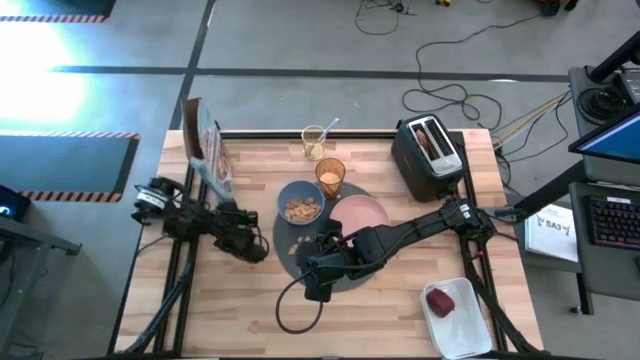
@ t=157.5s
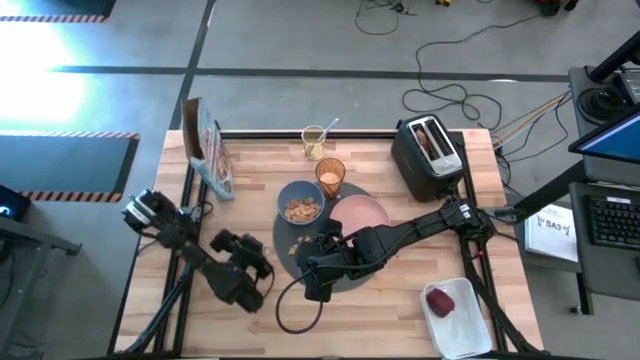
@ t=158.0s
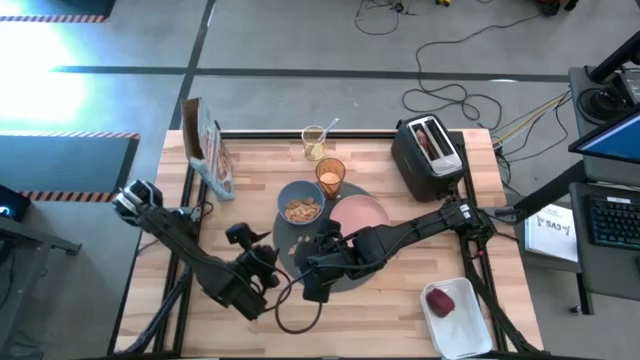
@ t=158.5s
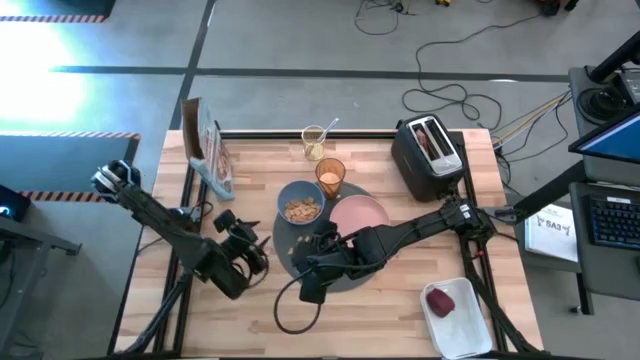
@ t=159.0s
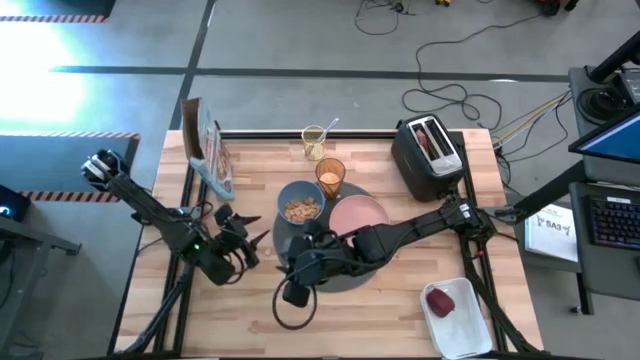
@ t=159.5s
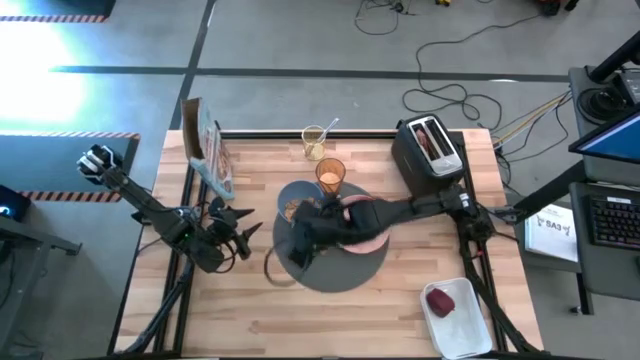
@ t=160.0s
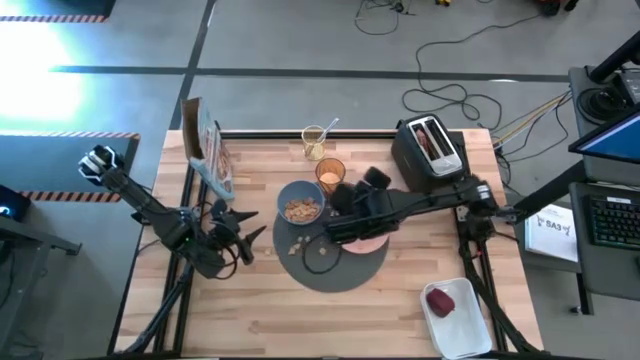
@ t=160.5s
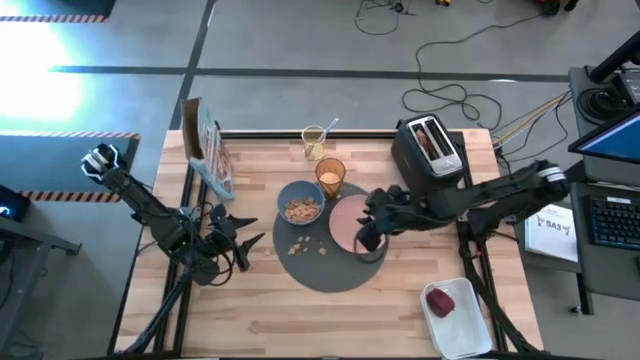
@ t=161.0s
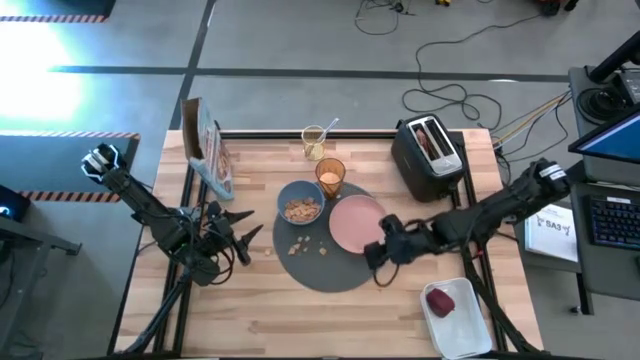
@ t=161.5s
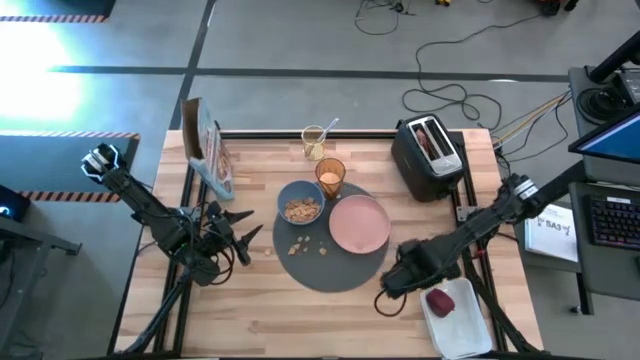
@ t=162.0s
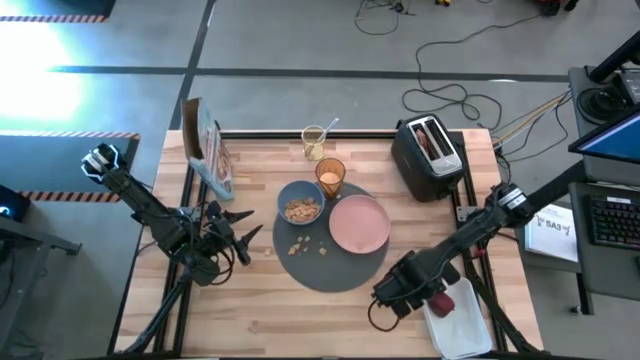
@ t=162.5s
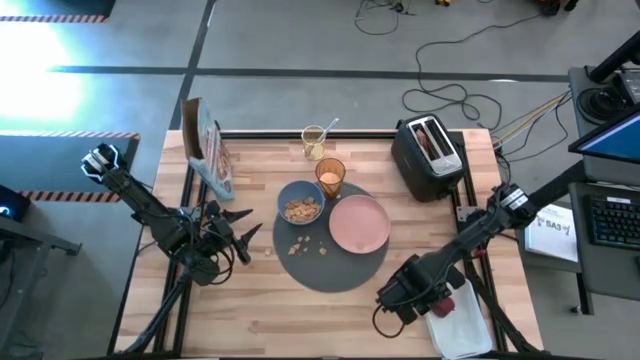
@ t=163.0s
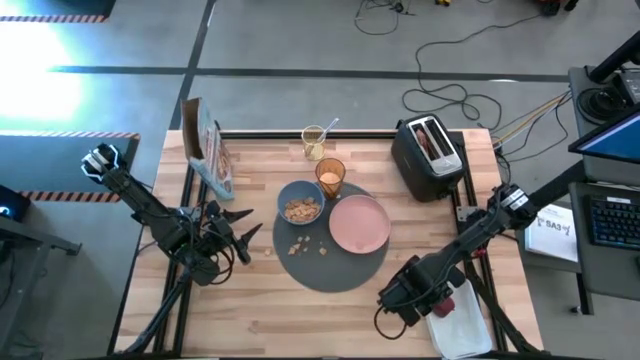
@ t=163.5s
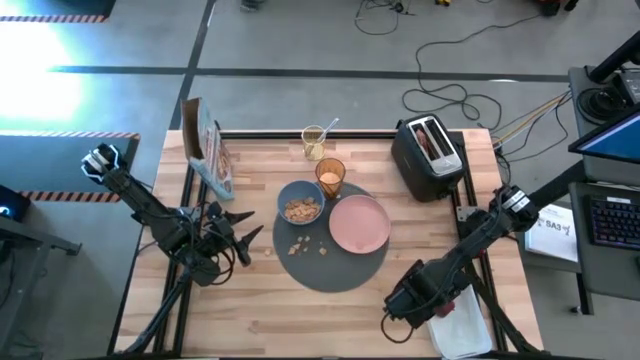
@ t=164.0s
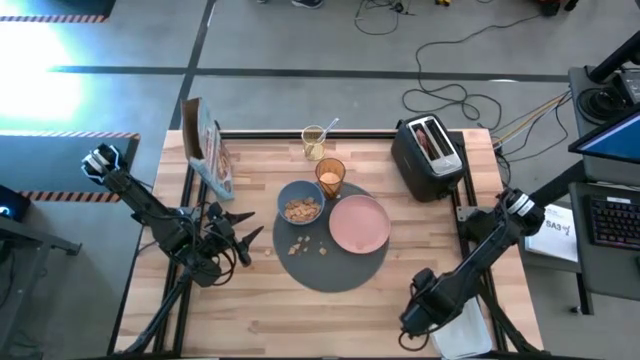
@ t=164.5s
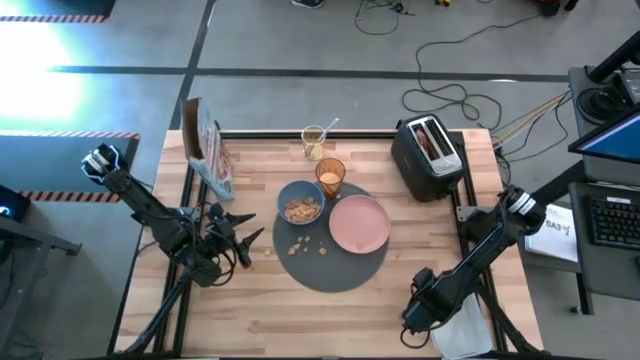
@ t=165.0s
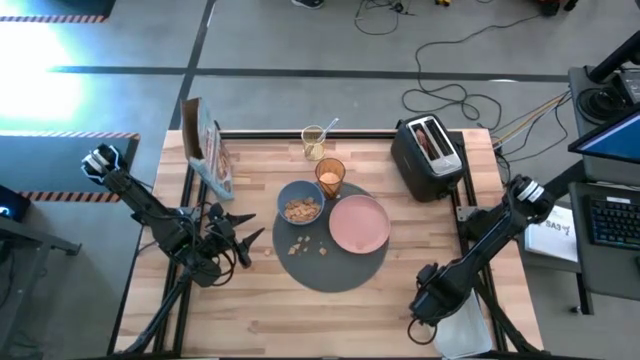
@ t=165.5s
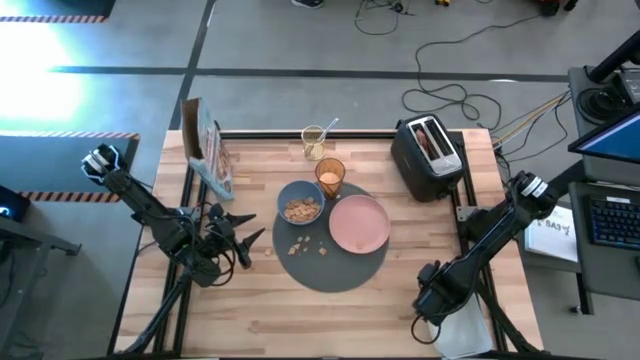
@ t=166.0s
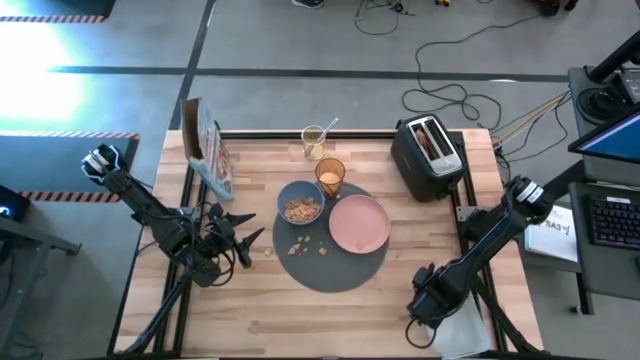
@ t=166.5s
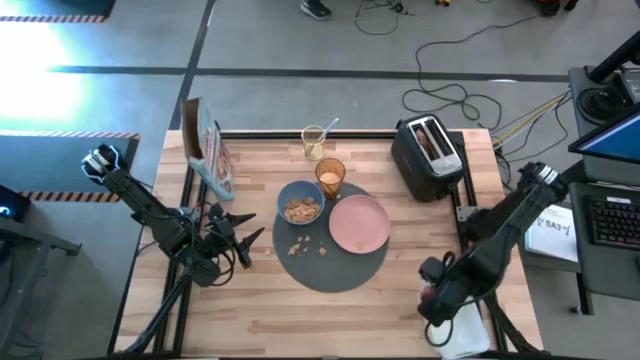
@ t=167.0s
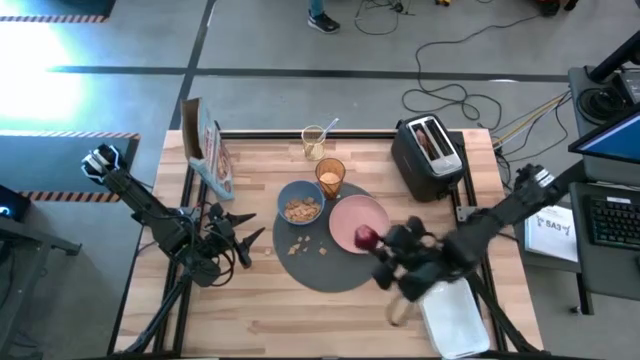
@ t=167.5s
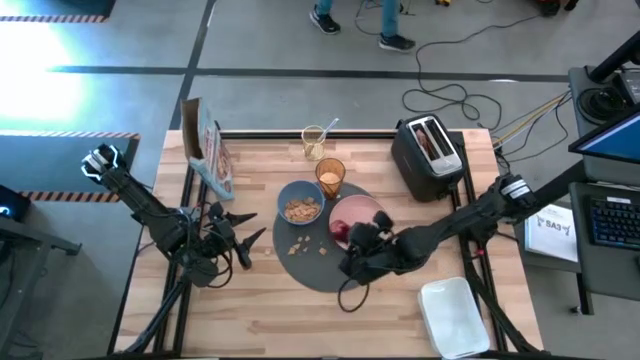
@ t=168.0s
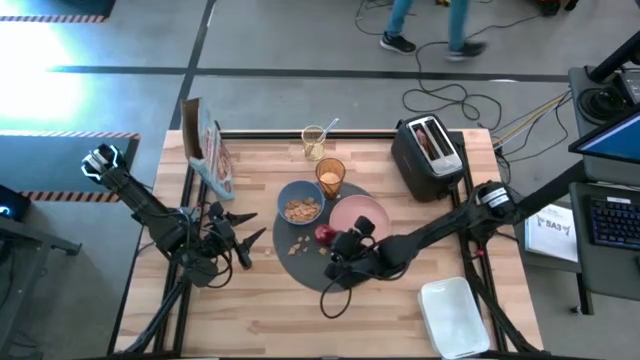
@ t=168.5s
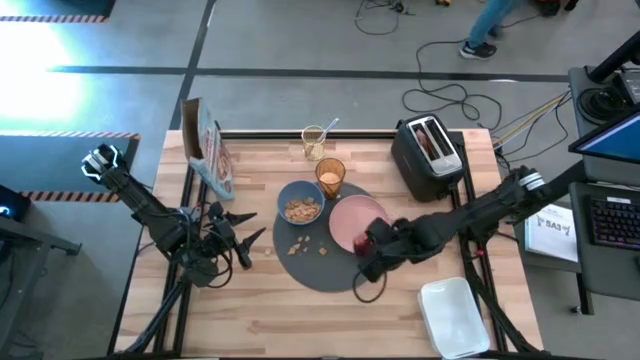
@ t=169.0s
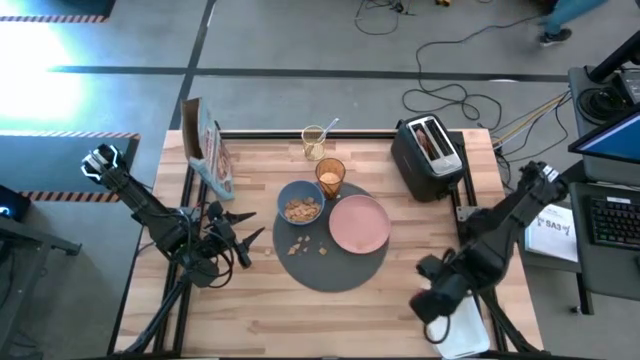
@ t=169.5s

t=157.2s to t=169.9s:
Task: Arrange a breakfast setting
Put the red apple on the gray table placemat

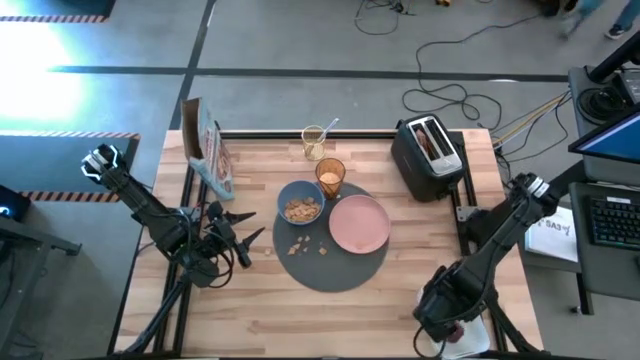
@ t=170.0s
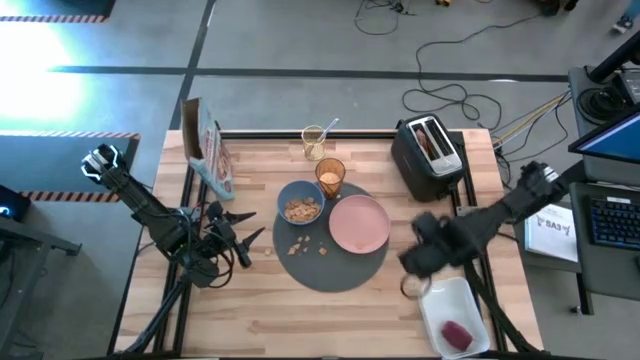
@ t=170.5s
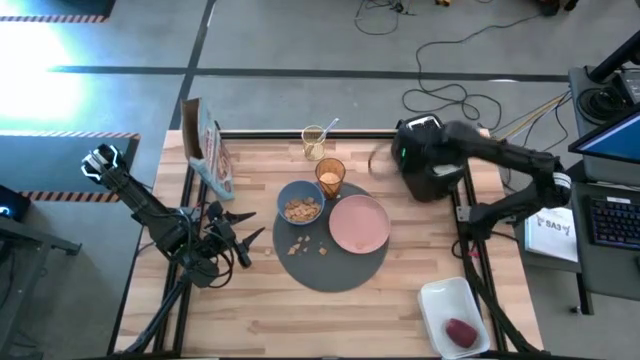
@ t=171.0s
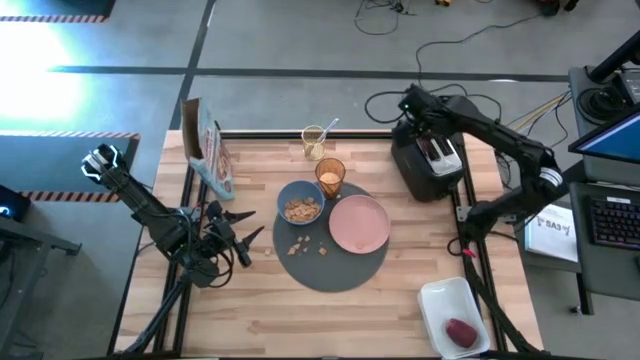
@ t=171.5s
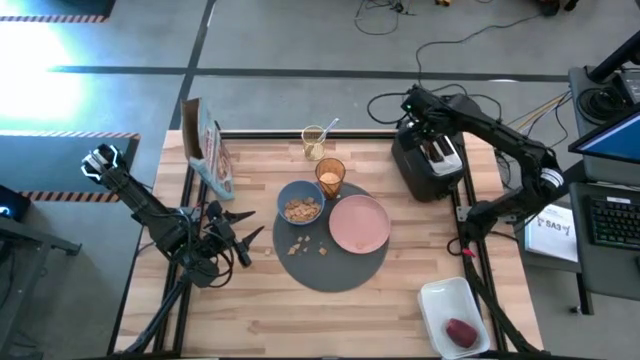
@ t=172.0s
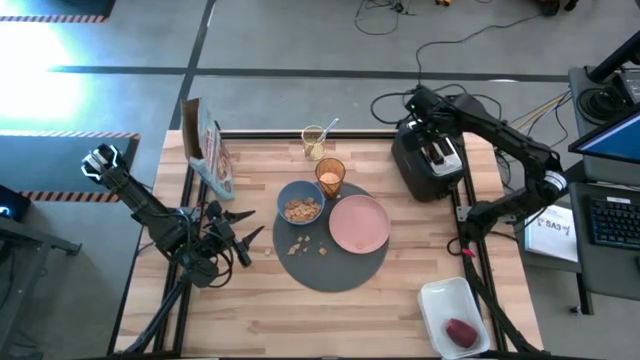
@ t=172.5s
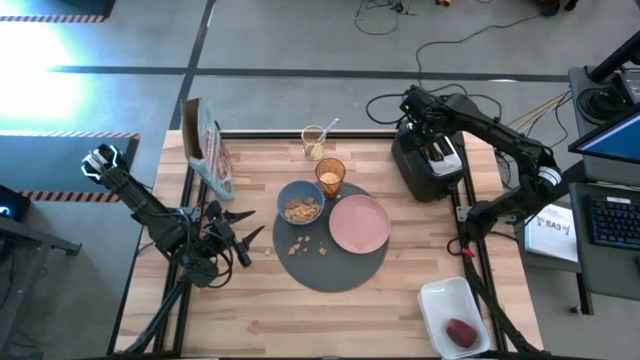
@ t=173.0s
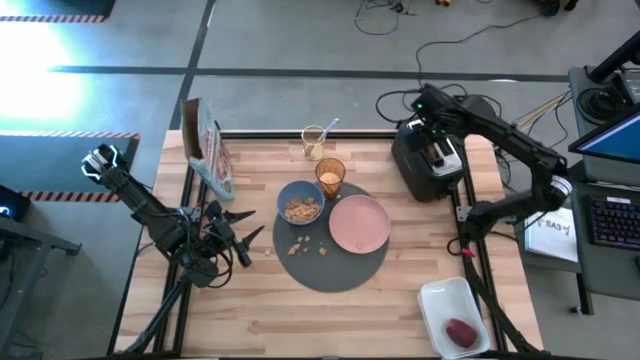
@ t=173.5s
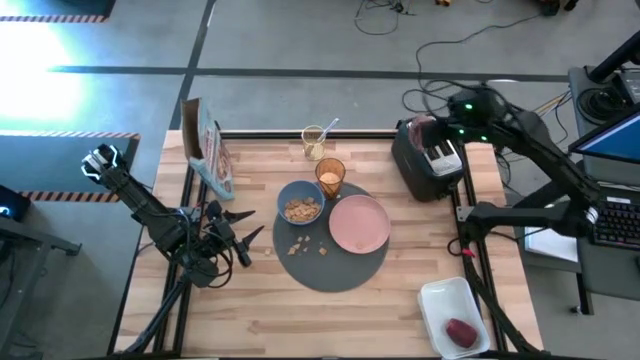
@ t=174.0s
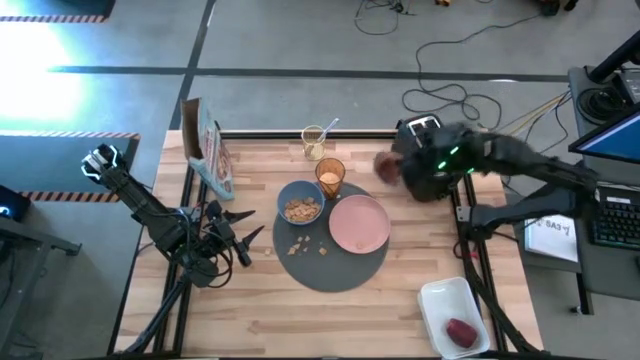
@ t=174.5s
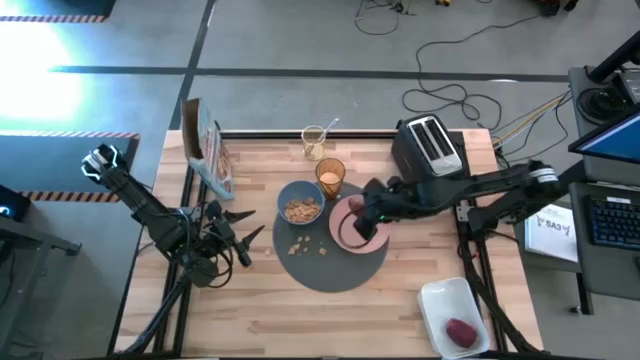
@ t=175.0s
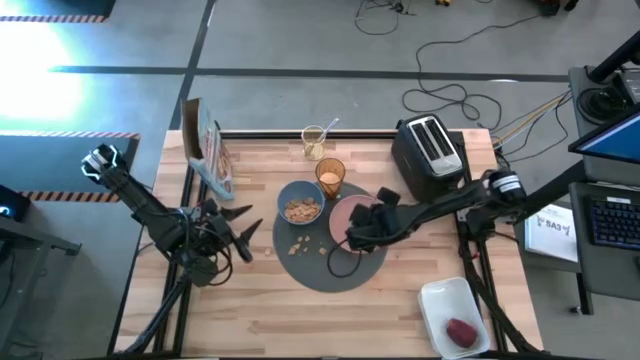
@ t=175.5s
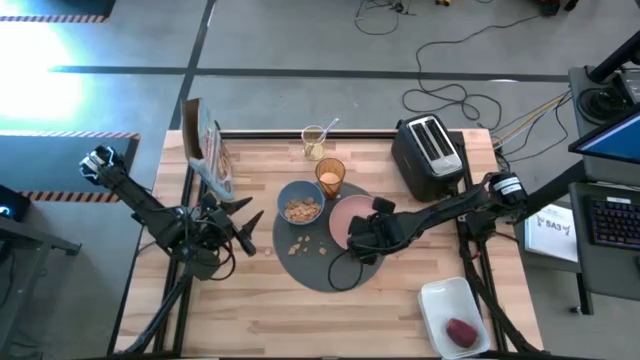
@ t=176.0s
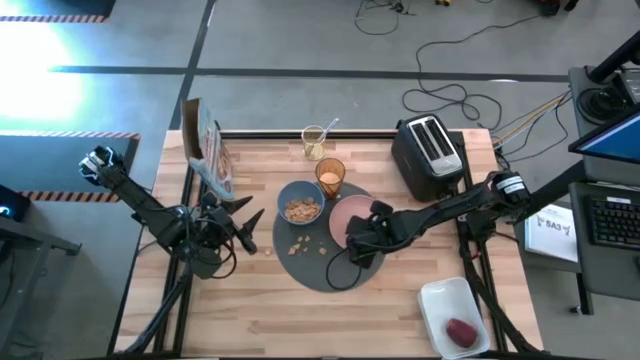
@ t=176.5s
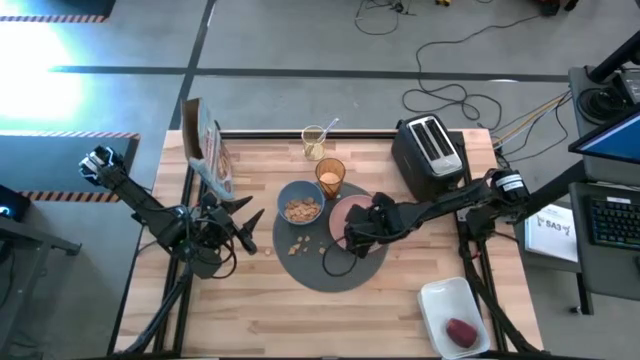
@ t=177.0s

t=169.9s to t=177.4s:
Put the bagel into the pink plate on the gray table placemat
